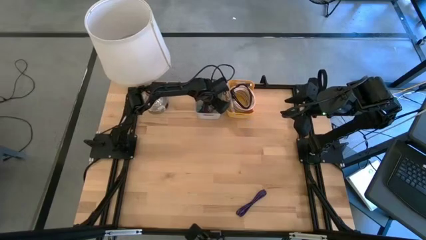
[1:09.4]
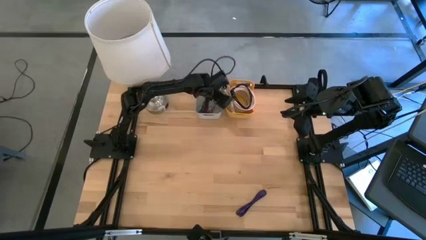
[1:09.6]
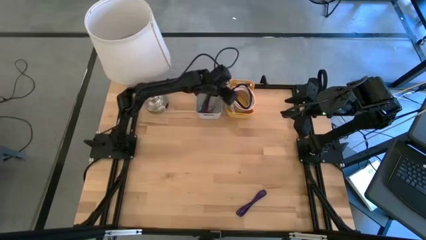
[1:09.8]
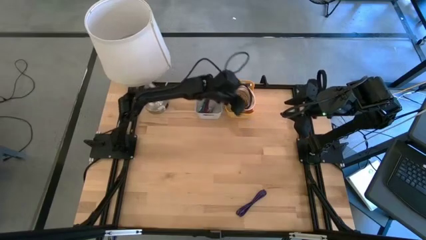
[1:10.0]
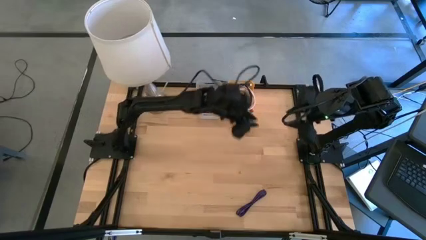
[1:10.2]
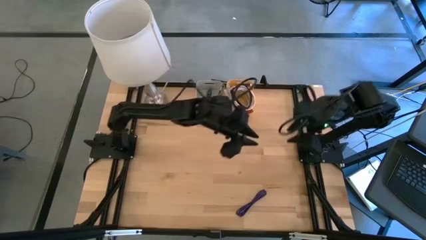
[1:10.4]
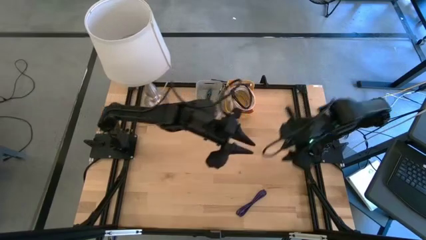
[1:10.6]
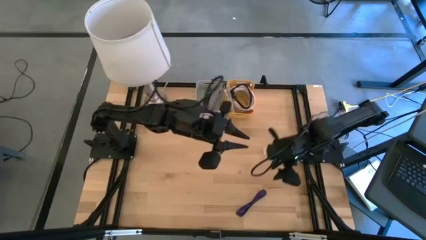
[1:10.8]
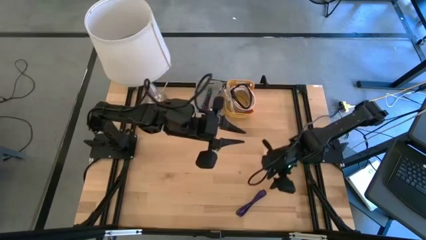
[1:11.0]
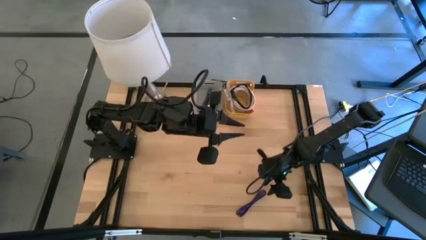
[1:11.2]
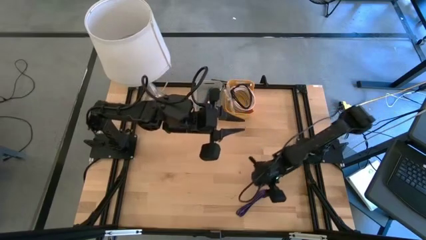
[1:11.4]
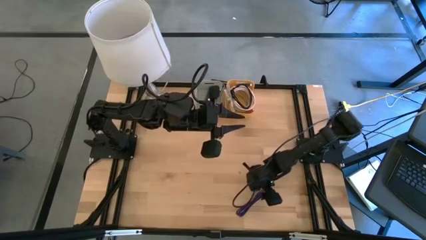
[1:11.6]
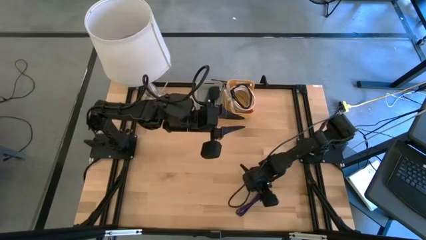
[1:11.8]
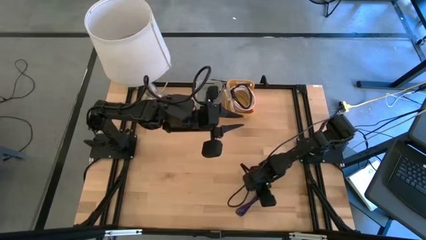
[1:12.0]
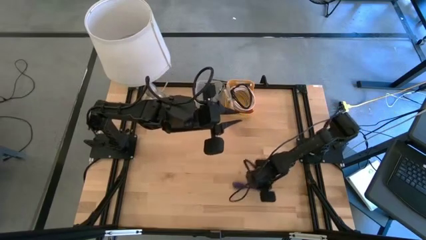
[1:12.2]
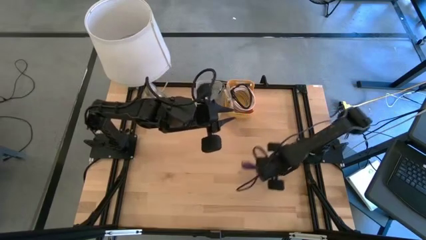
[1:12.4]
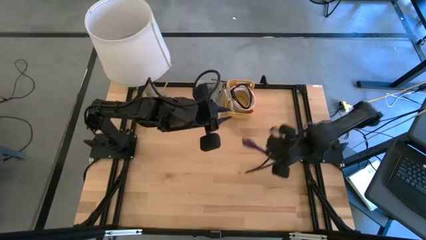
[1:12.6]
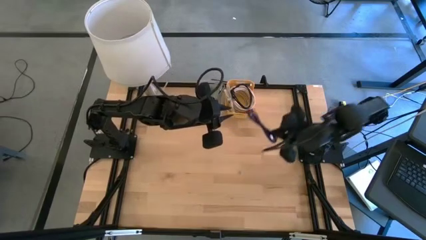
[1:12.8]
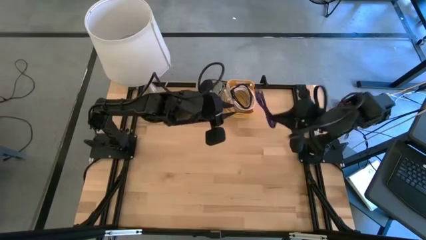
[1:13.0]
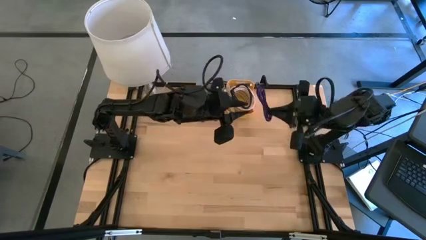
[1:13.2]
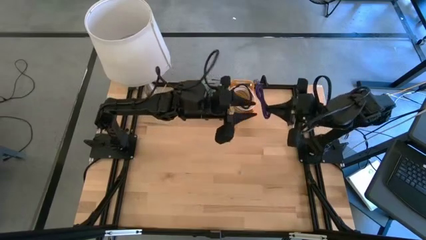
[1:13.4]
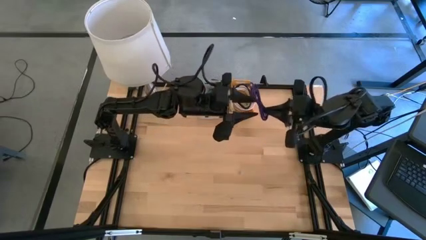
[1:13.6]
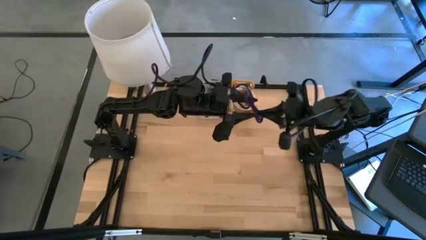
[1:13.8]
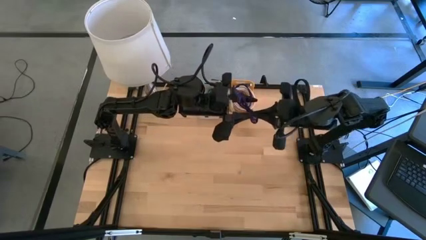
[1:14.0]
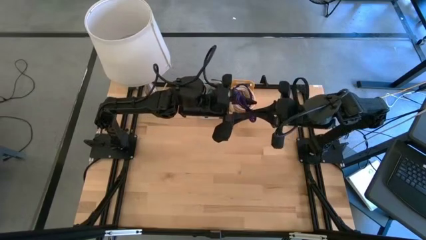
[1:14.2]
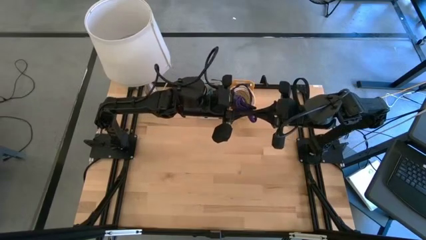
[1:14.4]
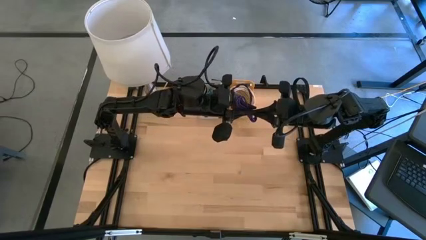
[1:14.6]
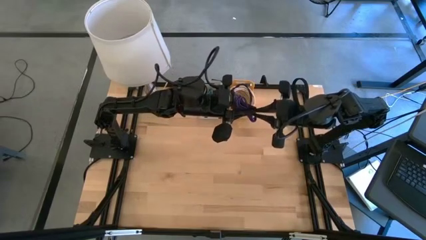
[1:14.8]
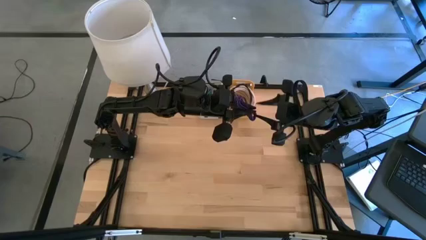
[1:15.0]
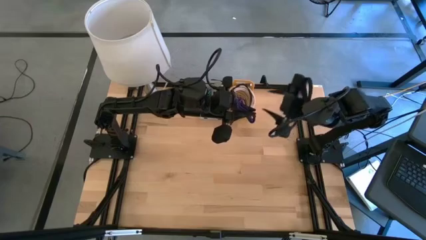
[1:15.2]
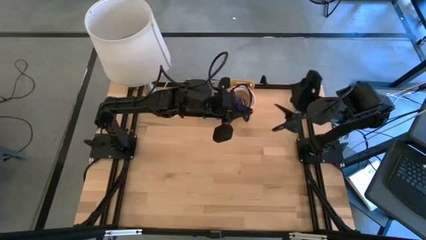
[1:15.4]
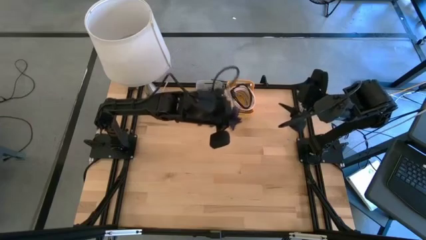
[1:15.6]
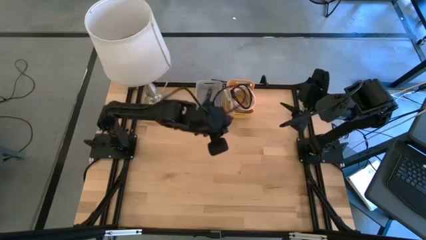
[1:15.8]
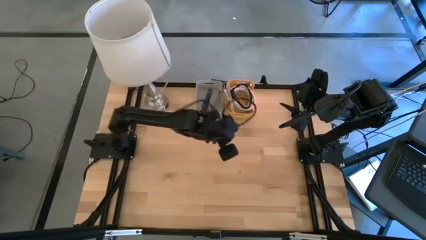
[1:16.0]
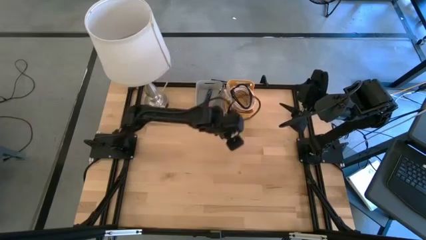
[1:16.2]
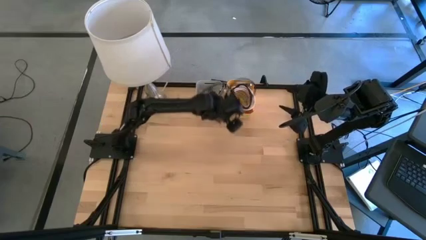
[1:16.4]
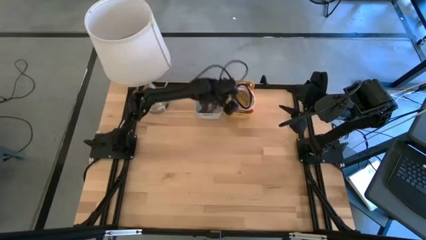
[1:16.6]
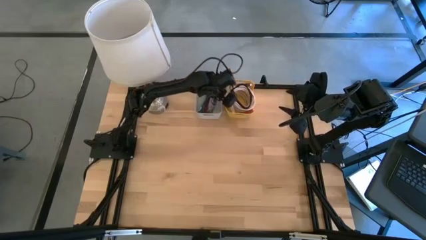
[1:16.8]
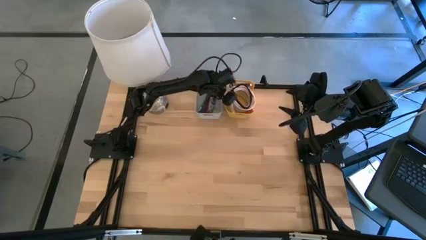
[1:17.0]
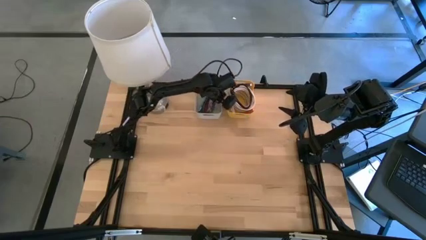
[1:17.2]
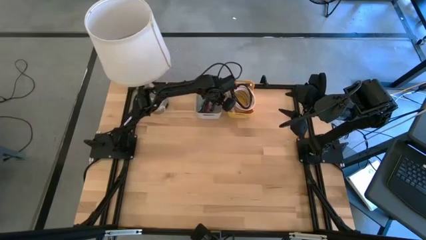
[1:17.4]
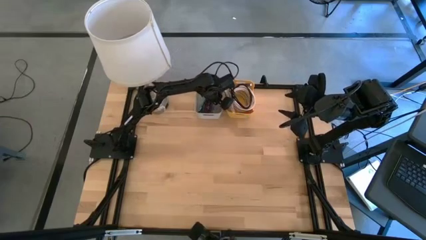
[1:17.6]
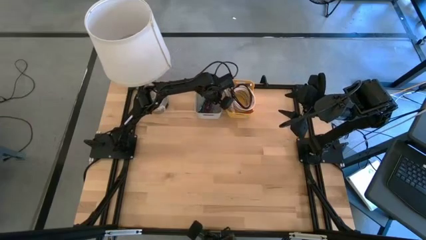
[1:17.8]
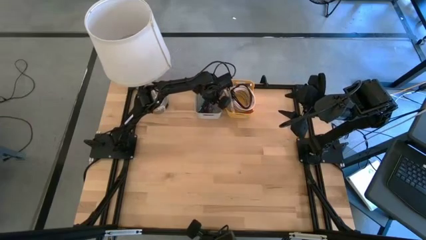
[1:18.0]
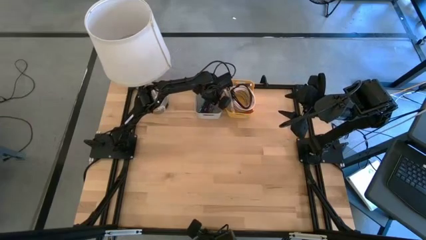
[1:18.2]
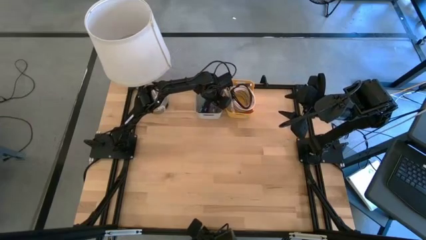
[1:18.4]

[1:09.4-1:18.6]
Put the purple USB cable into the gray bin
